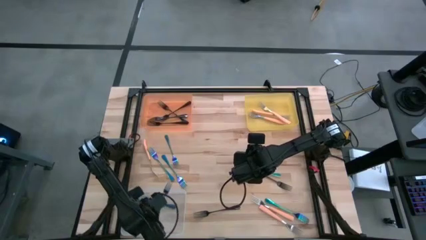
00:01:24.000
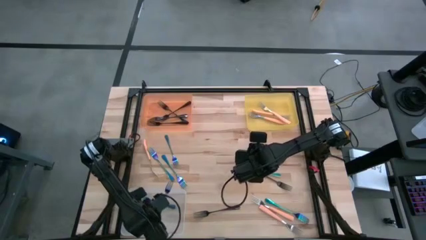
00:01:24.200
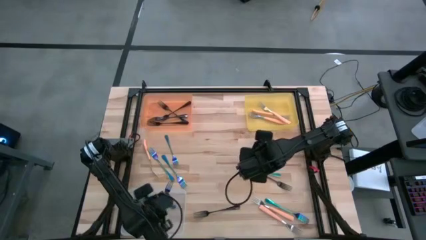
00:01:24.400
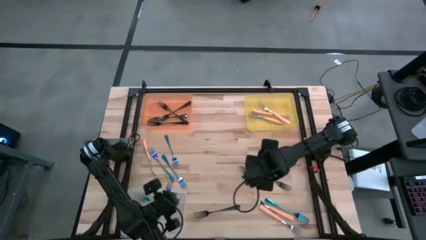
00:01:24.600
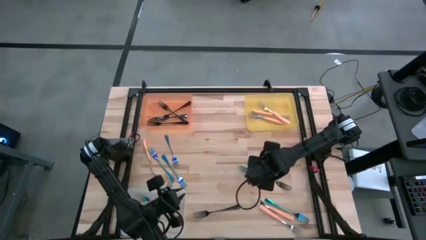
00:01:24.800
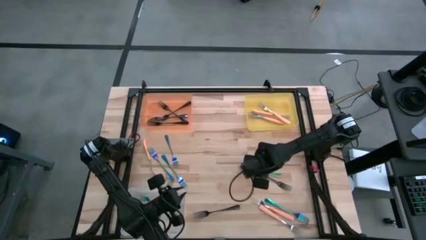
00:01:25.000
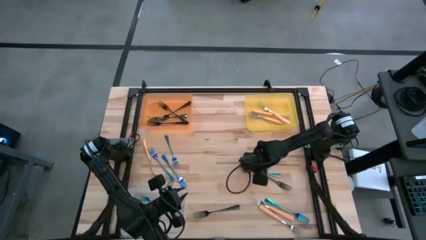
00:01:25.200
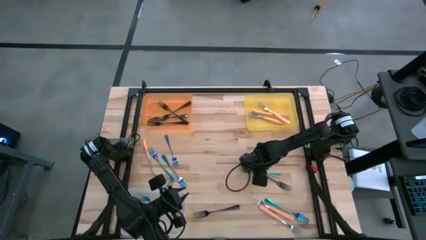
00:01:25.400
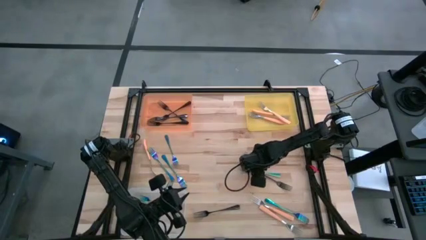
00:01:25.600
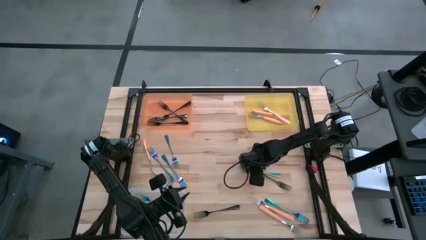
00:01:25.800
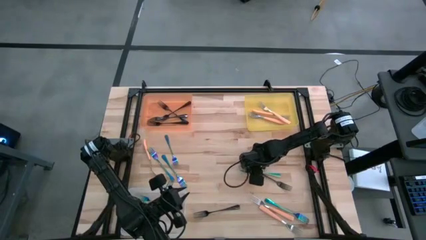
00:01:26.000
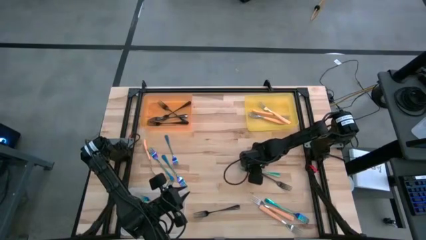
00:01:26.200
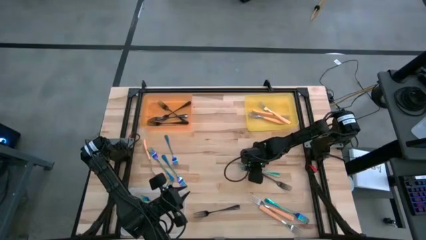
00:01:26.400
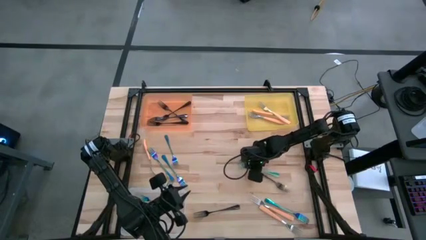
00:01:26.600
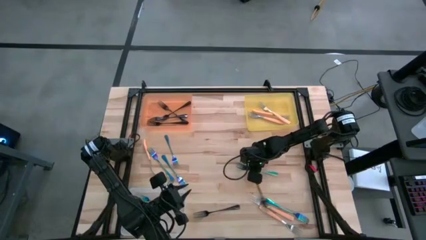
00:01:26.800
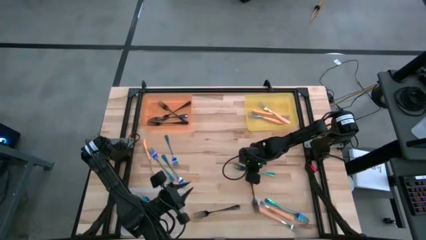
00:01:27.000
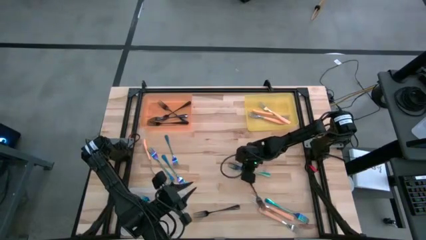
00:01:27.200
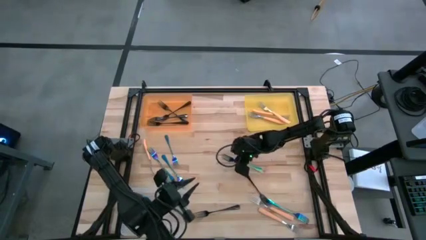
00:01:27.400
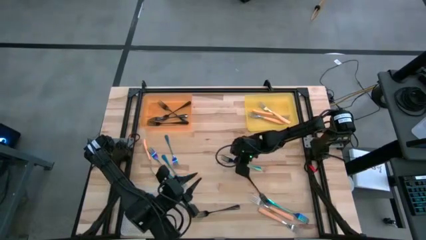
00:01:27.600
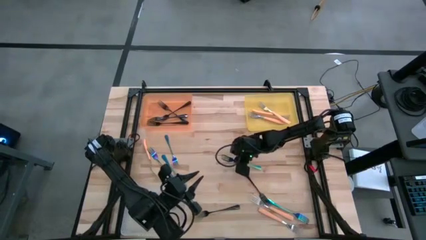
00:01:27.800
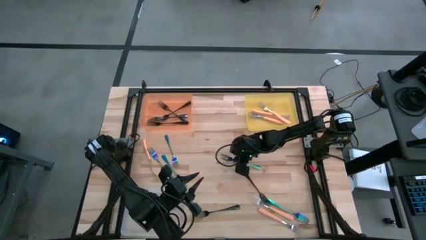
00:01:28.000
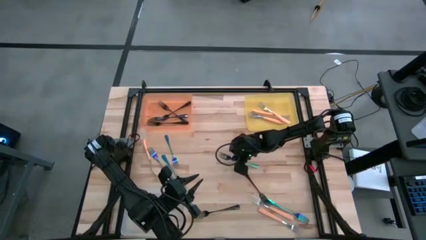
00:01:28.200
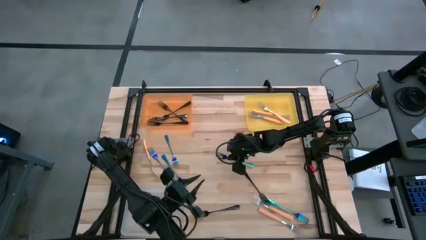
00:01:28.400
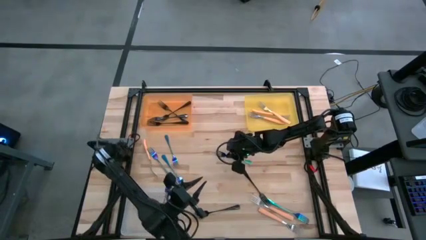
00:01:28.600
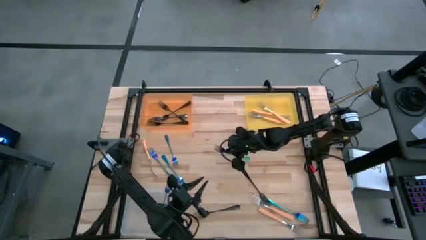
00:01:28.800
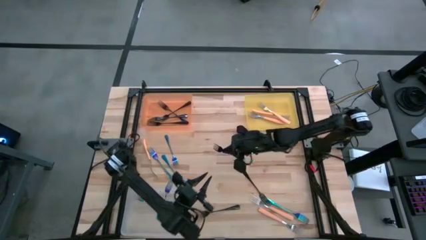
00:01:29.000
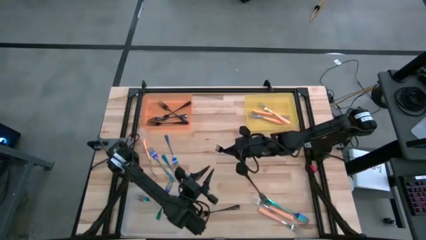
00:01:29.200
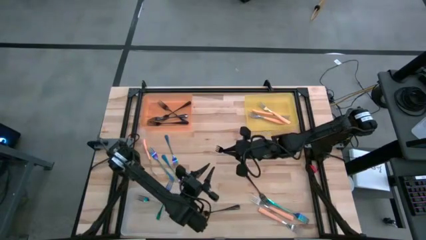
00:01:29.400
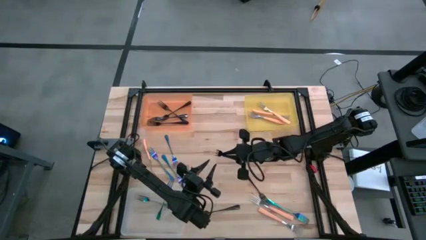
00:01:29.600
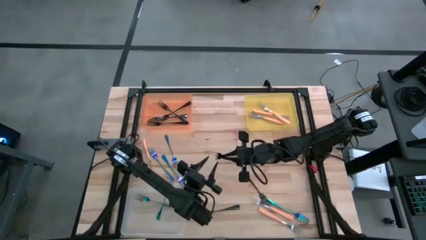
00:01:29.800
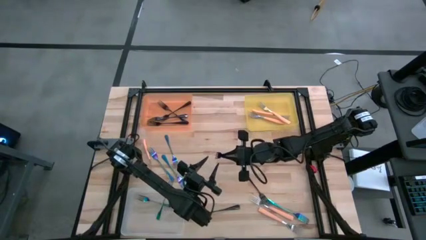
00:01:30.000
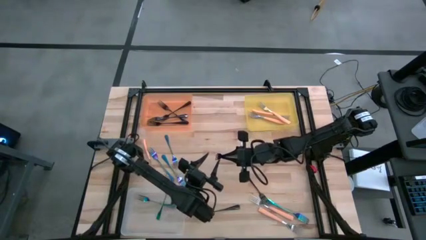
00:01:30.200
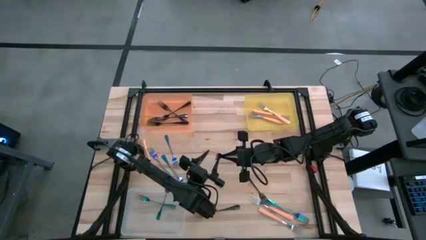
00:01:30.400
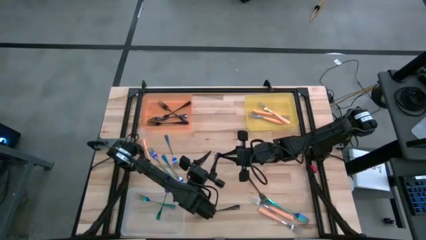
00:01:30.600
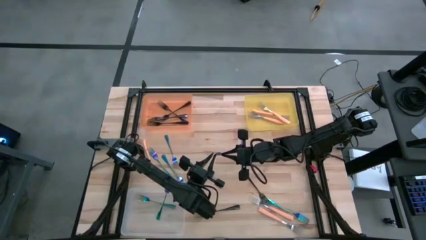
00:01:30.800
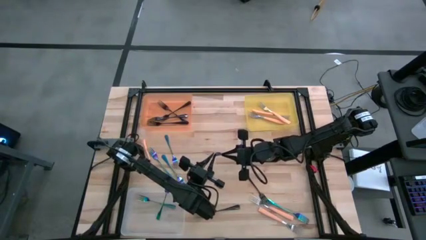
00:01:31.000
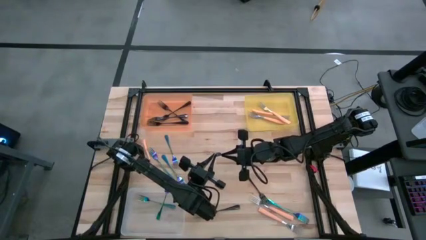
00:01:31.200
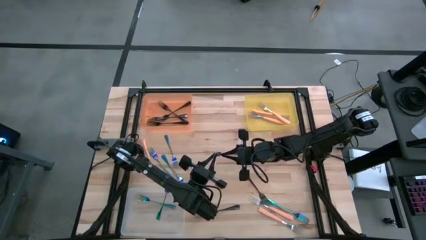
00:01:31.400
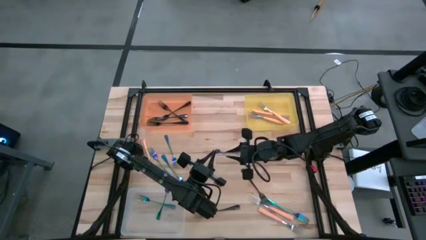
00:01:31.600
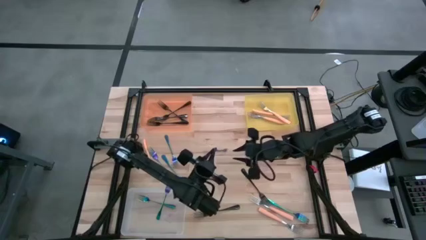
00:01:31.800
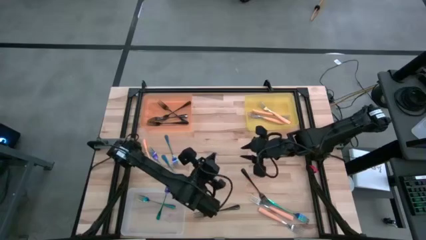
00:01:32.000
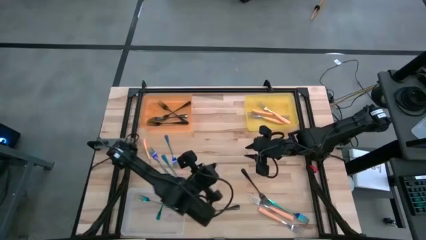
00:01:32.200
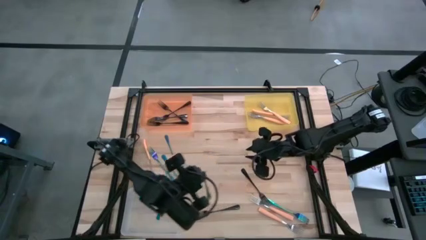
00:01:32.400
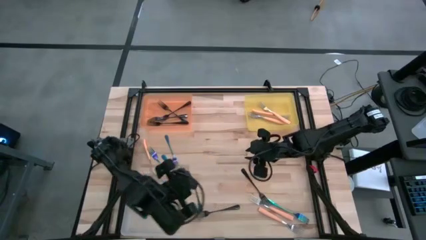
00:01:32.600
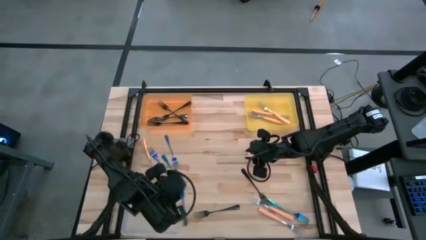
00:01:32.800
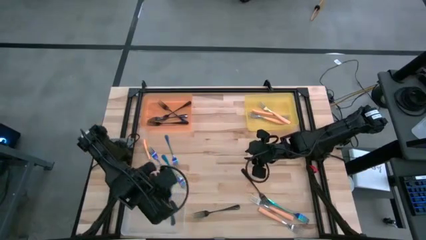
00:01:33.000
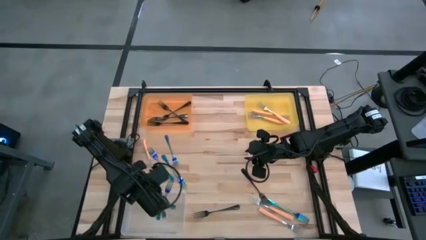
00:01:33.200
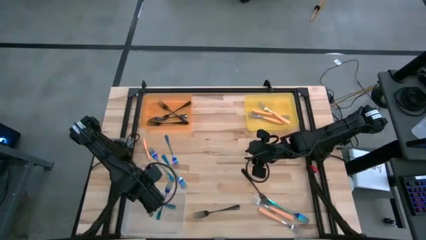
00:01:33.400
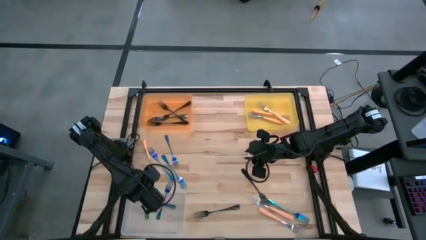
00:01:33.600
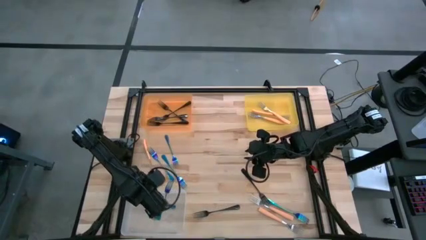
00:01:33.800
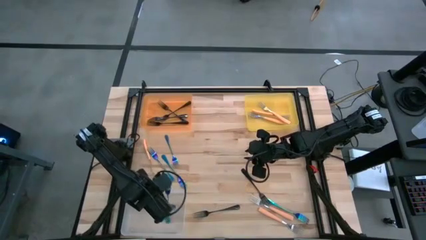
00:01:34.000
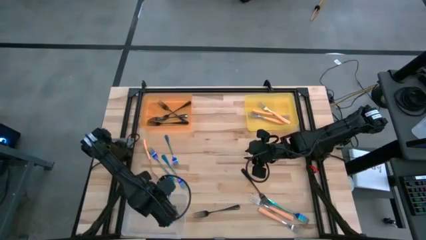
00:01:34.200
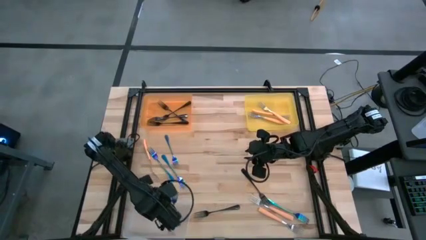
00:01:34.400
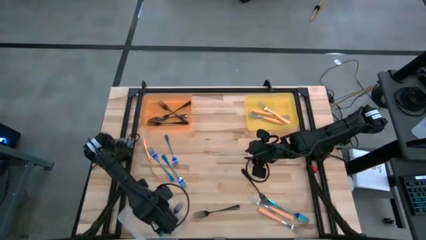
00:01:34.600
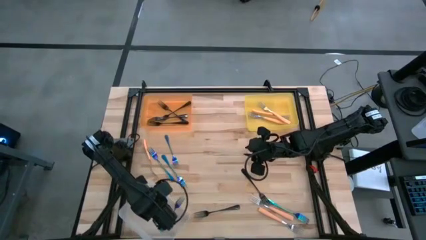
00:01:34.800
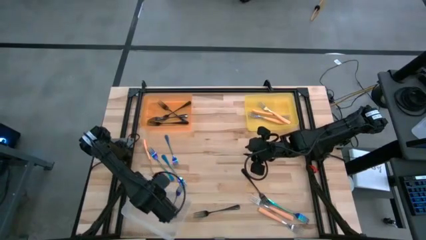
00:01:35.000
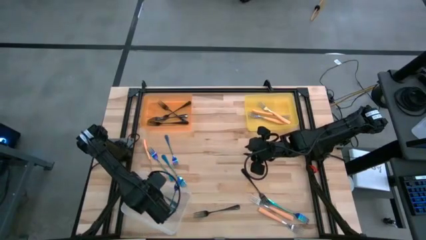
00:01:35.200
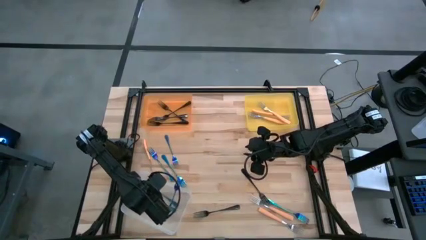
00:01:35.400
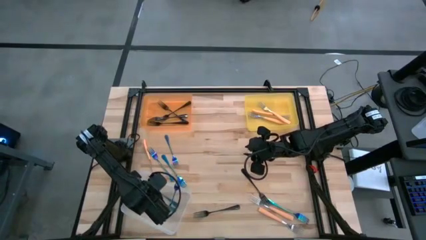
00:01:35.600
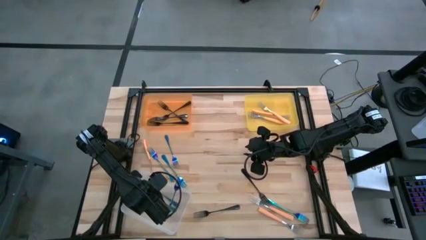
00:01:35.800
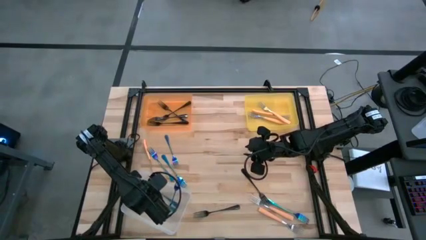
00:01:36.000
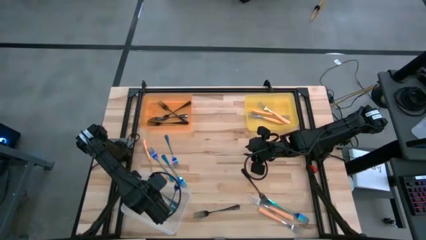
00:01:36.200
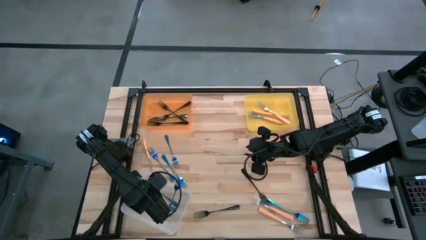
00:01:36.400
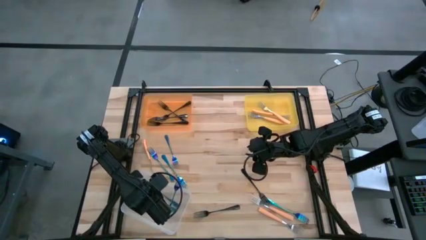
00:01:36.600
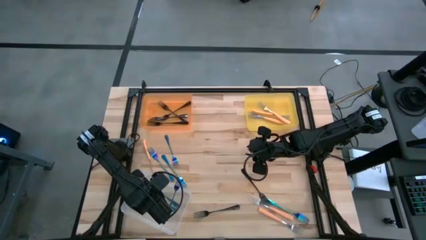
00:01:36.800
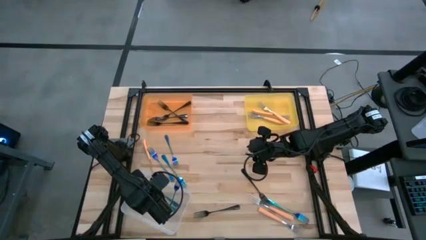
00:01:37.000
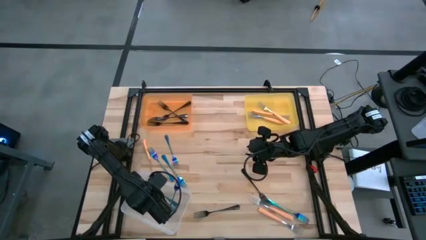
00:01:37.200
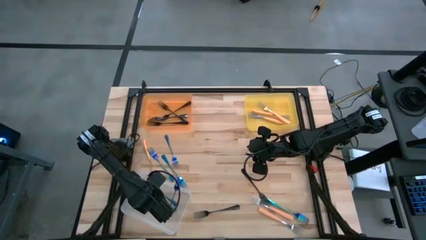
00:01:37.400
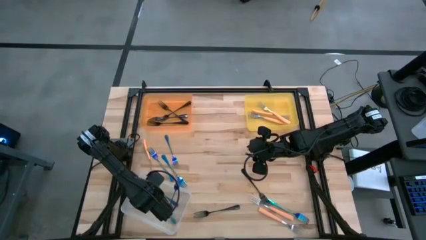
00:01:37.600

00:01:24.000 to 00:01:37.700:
Task: Sort silverware by color (type)
Put the blue fork into the transparent bin

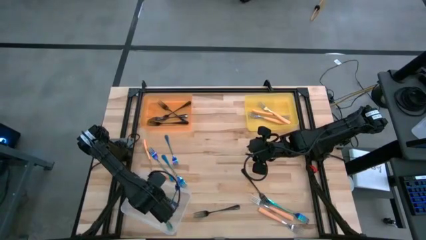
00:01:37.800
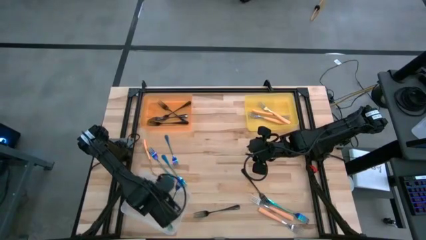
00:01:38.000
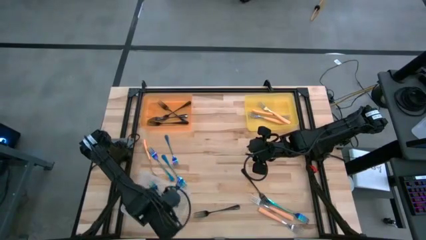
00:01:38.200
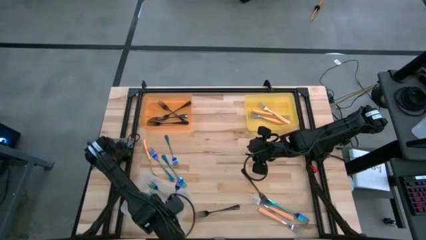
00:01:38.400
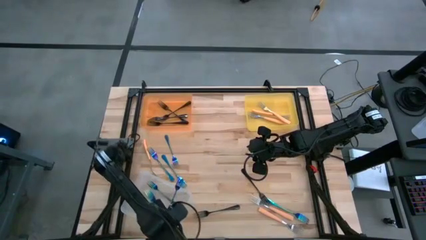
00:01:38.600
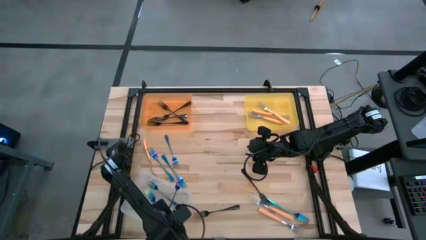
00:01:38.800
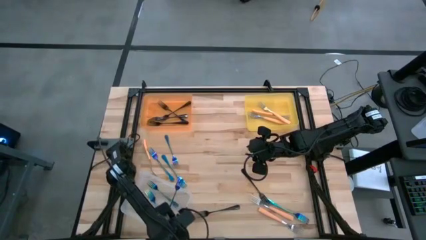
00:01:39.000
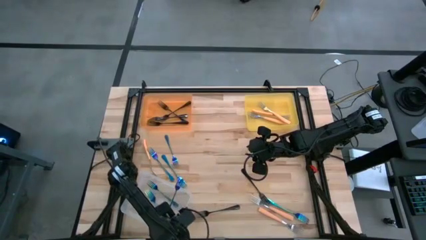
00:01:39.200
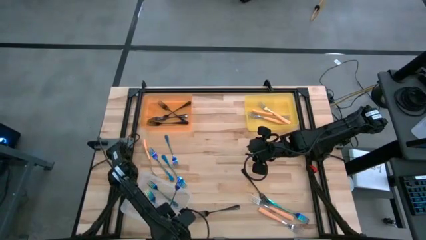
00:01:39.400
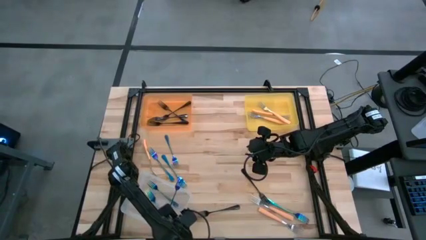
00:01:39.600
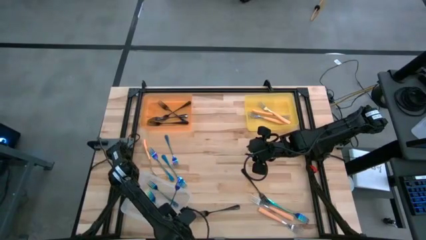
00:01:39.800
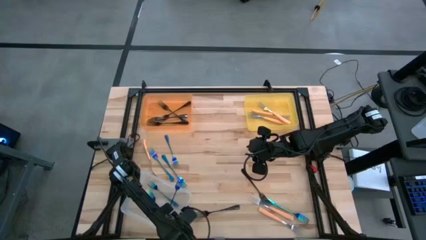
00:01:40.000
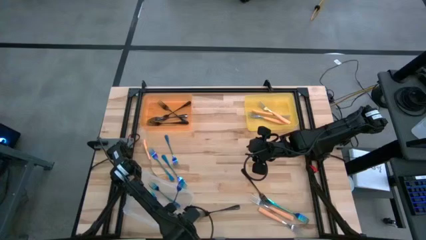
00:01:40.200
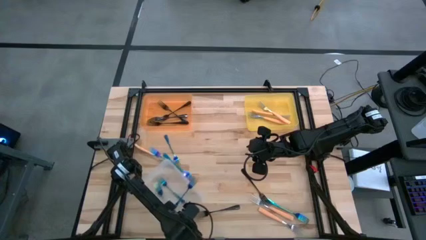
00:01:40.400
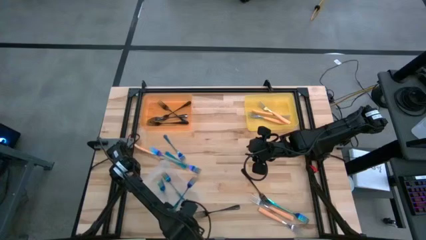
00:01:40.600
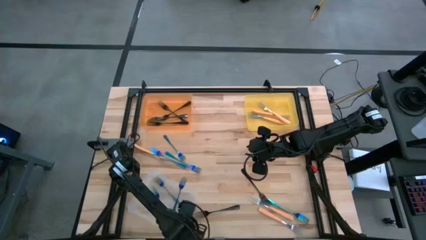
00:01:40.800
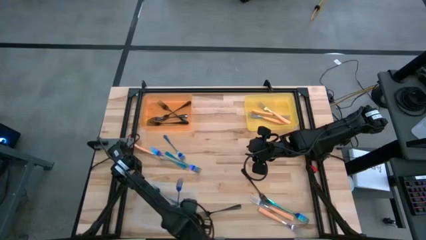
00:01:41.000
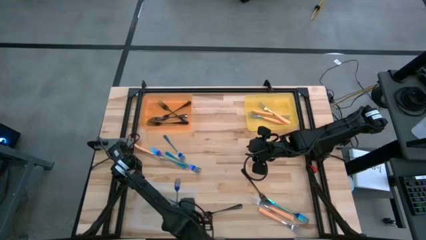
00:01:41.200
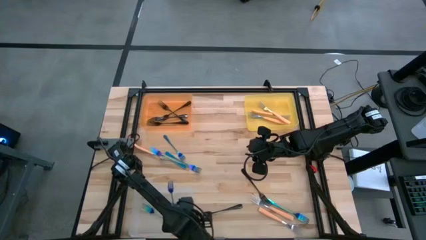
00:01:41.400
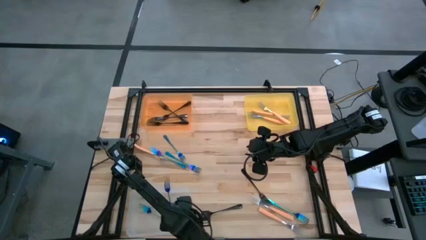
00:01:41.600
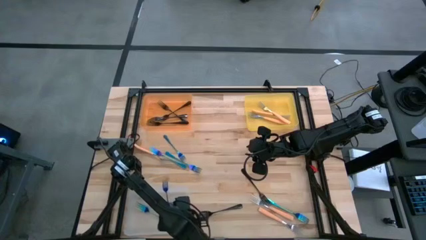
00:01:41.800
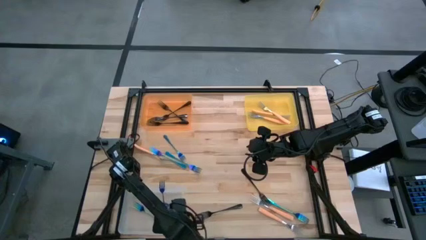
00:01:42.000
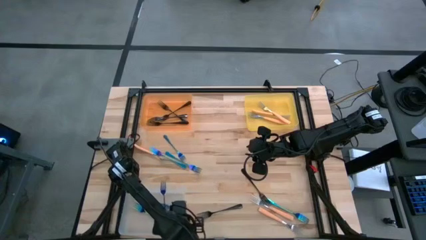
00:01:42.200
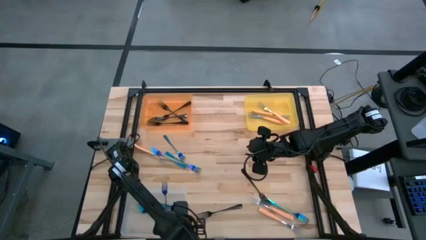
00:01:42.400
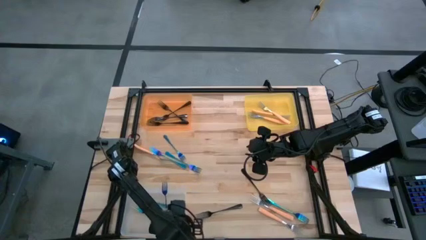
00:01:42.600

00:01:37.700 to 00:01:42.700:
Adjust the transparent bin
